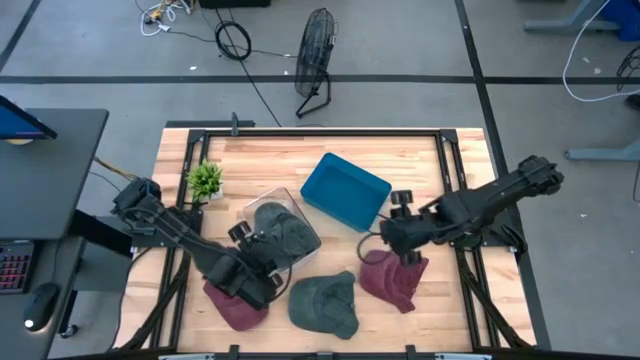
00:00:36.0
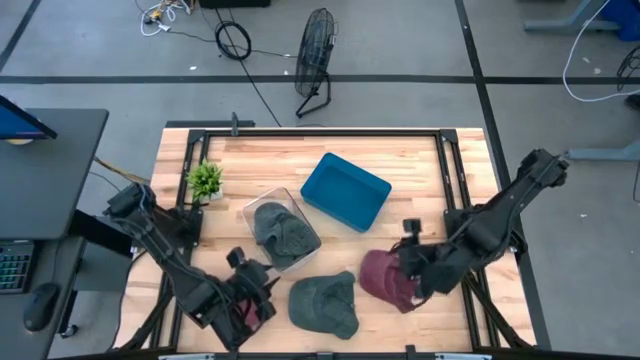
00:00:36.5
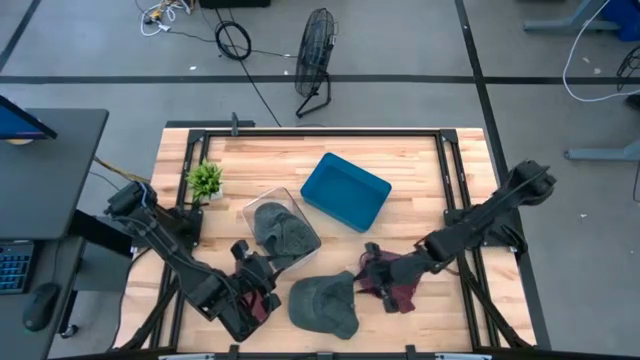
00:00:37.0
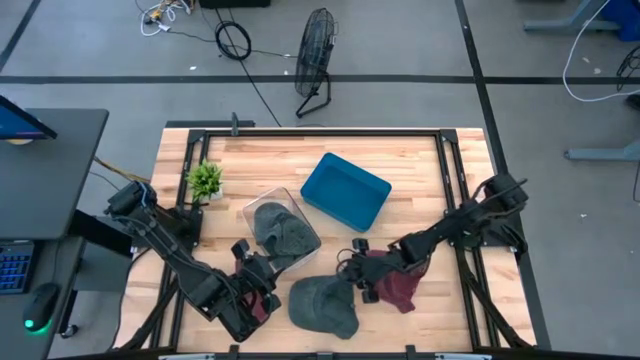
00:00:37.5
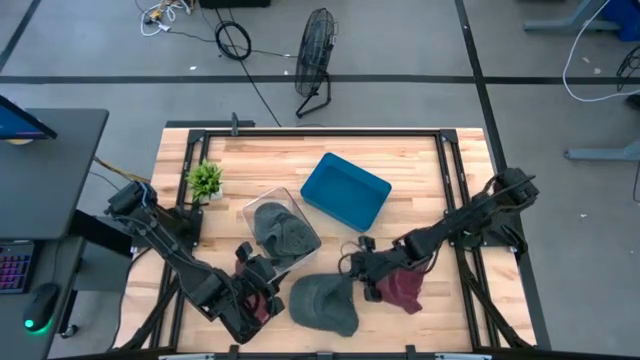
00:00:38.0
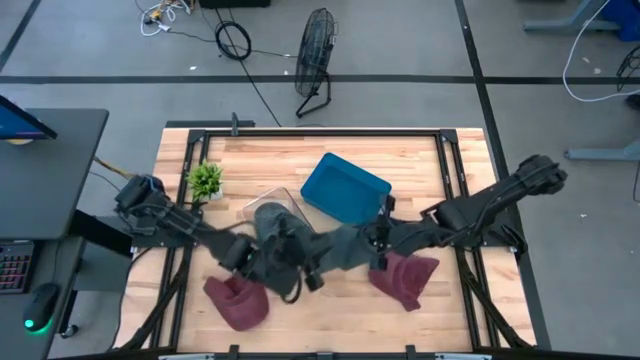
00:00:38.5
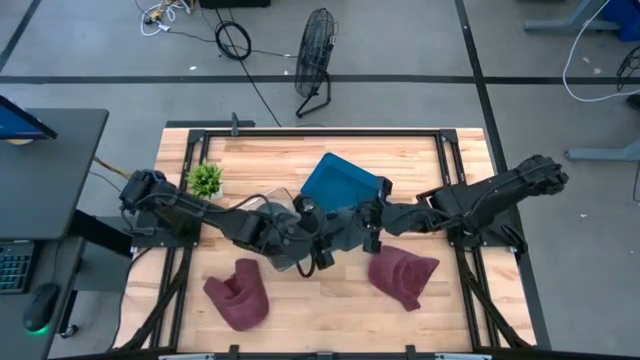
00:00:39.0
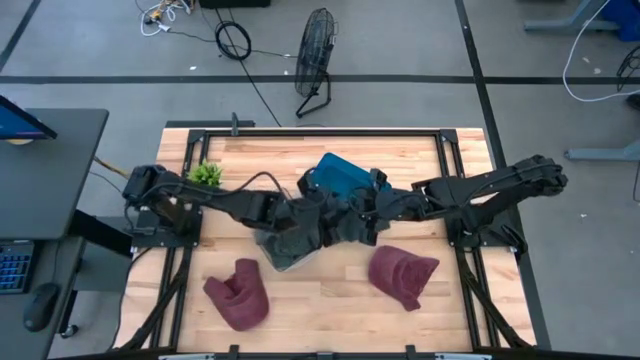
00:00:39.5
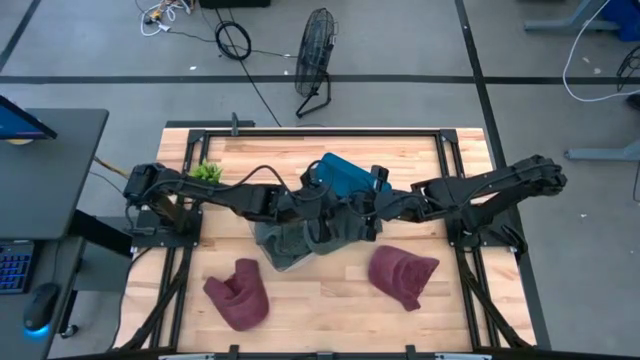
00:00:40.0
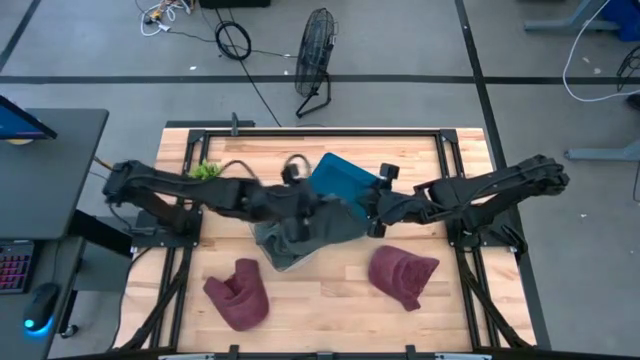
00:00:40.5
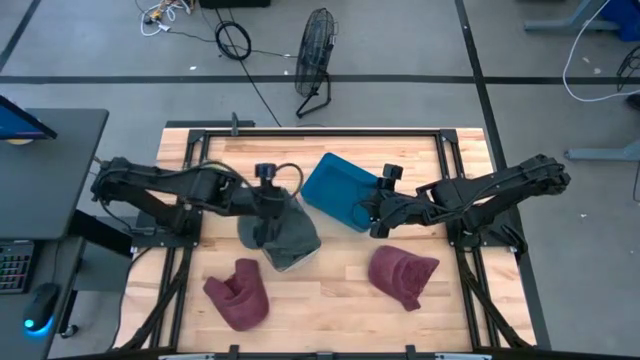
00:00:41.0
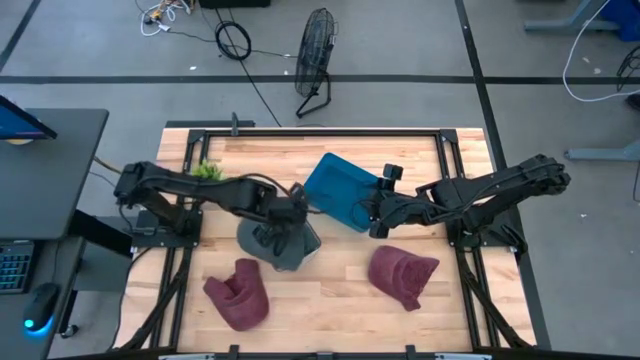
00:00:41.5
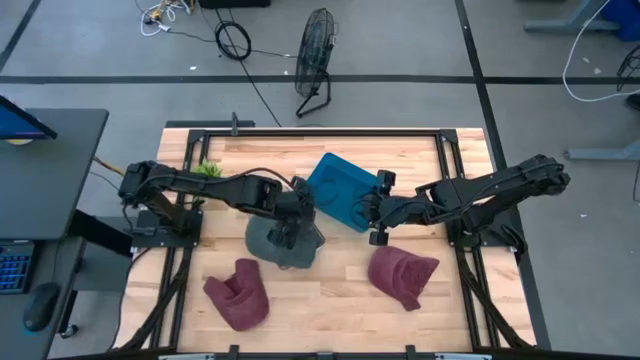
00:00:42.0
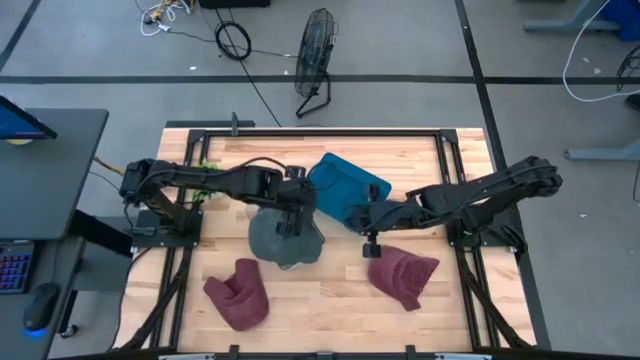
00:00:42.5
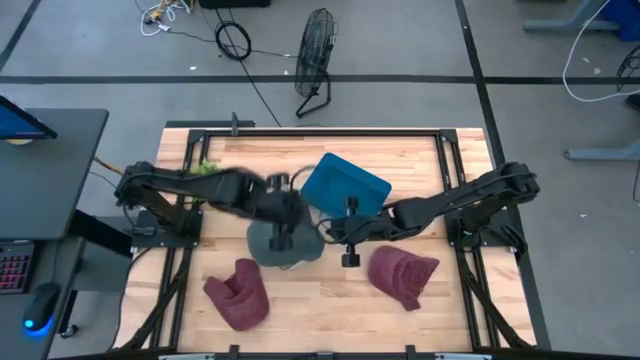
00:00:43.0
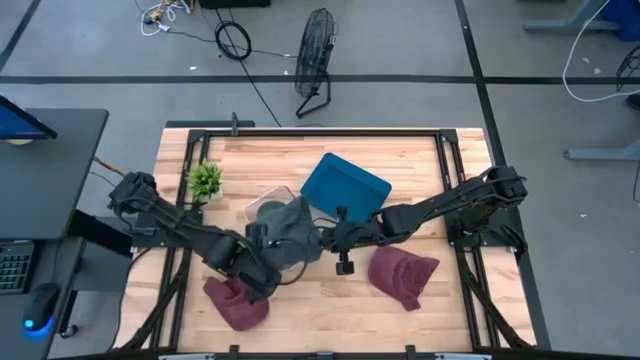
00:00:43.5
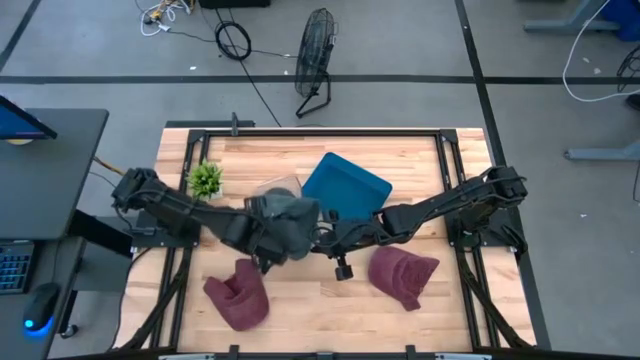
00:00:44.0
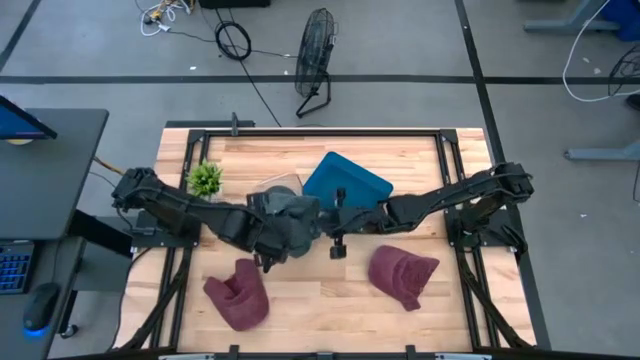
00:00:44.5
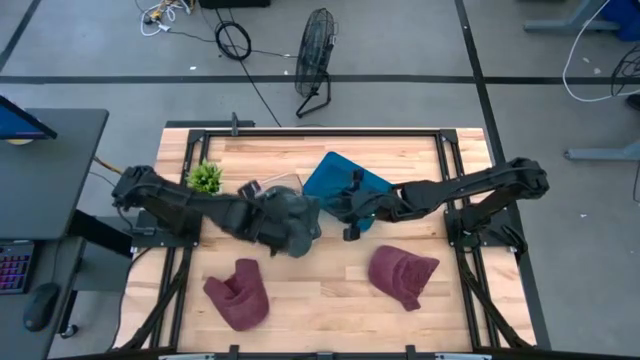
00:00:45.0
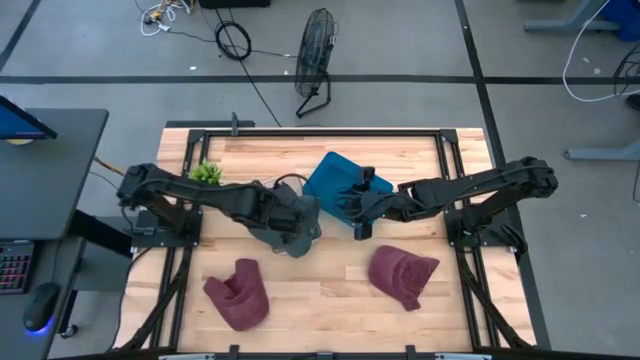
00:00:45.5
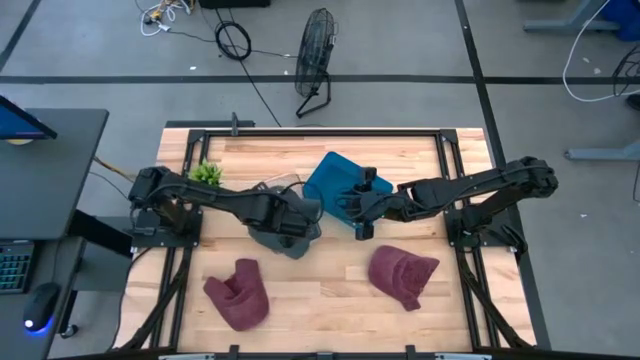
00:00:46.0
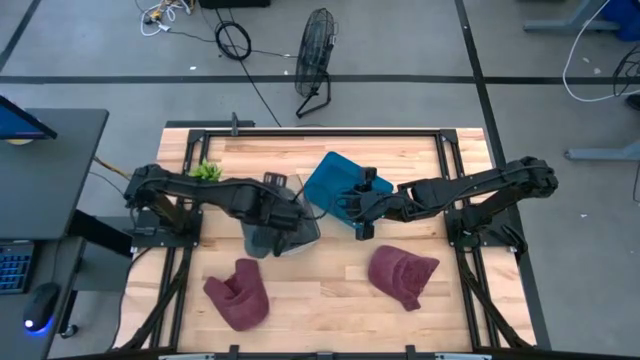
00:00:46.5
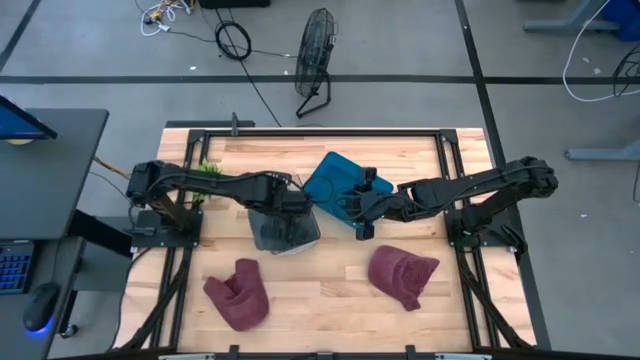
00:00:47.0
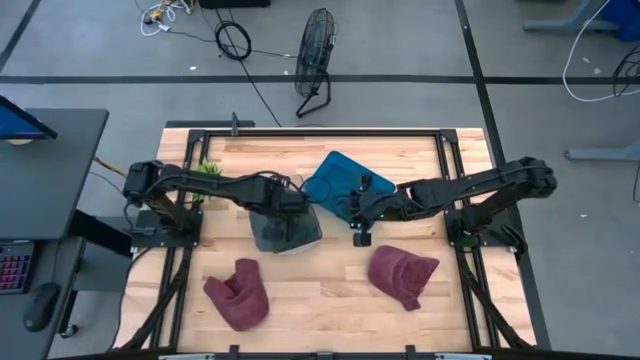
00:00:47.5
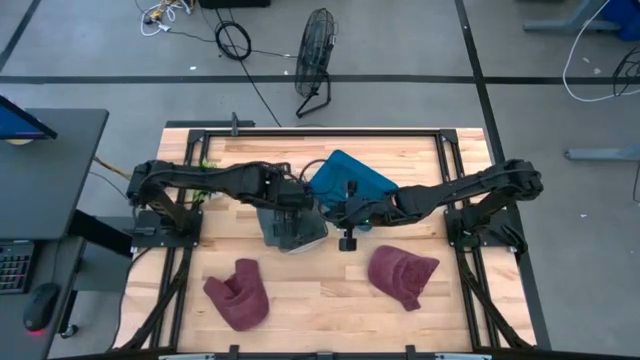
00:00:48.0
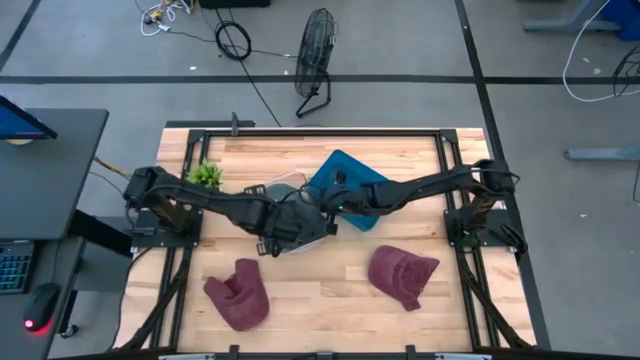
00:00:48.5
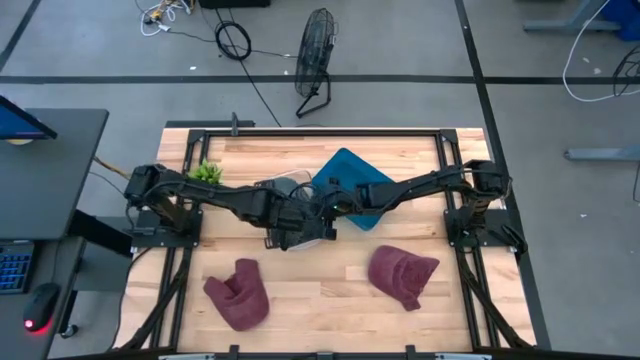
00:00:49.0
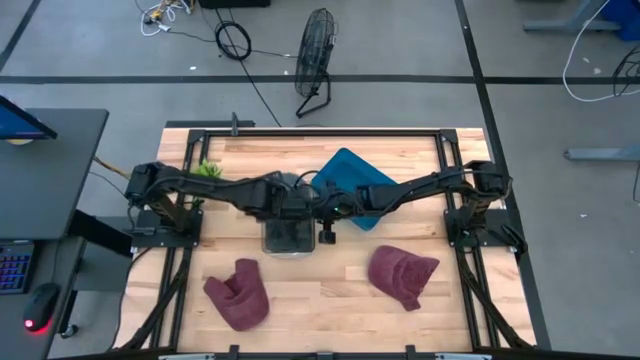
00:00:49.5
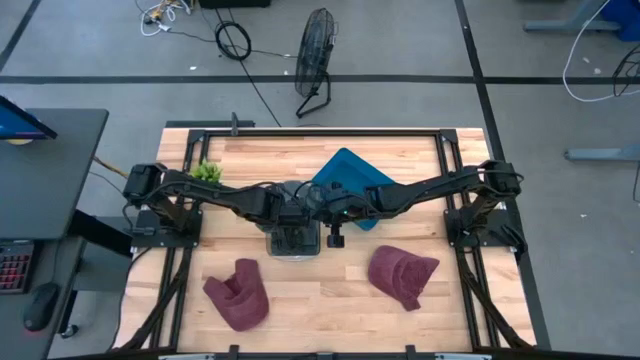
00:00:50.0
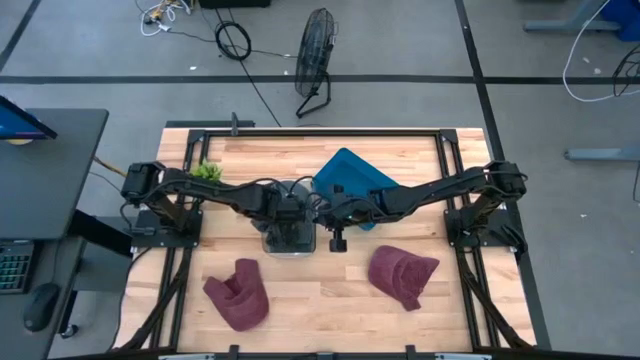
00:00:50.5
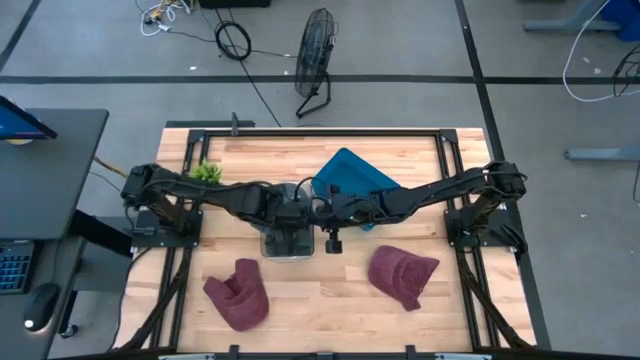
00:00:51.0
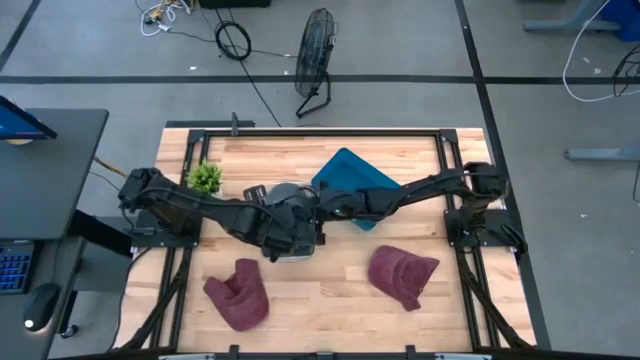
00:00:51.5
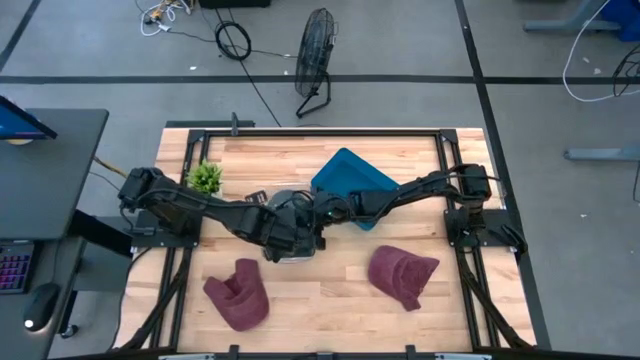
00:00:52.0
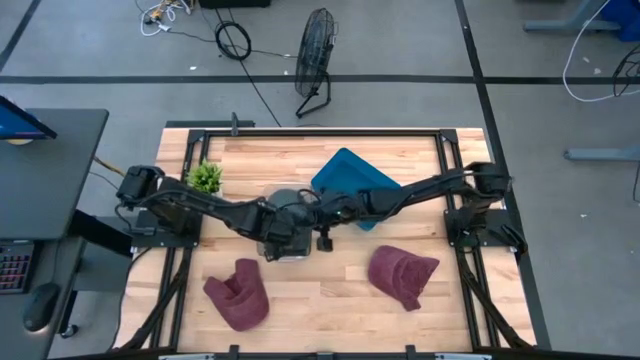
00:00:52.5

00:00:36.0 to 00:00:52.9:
Task: Pick & Place hat
Put the gray cap into the transparent bin

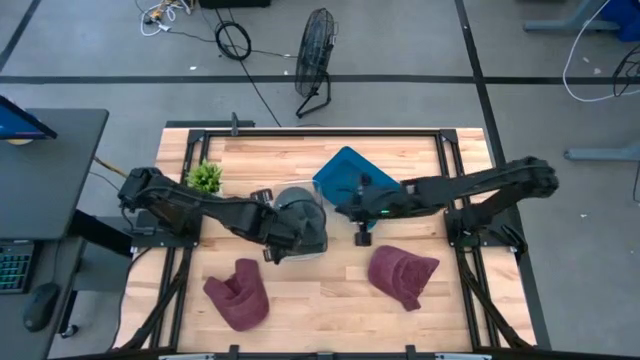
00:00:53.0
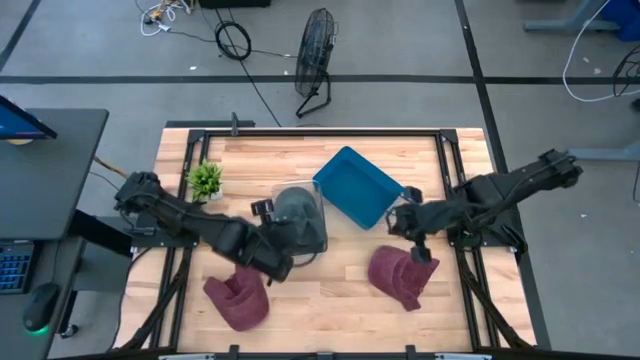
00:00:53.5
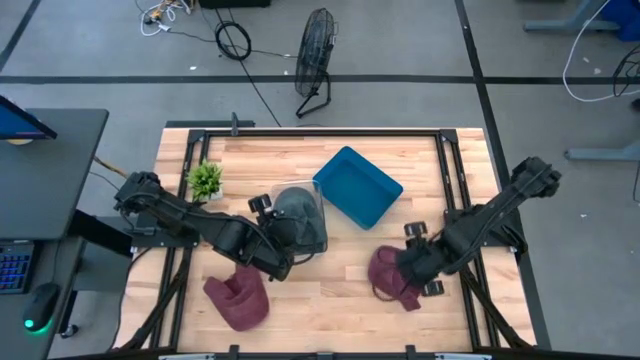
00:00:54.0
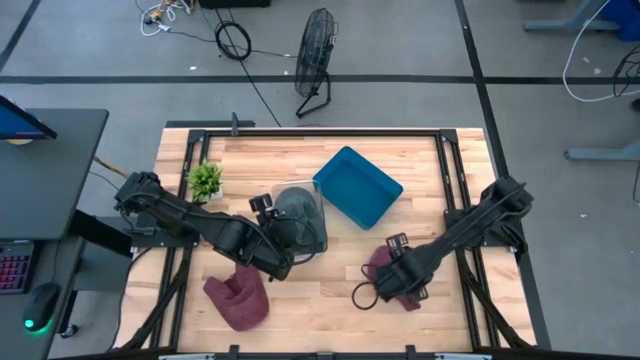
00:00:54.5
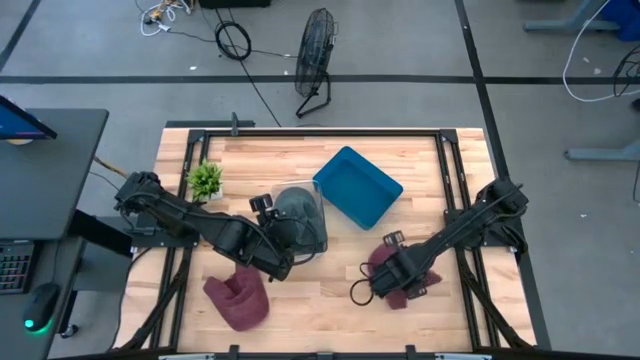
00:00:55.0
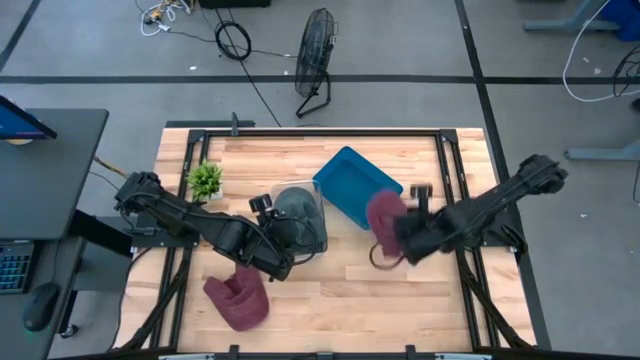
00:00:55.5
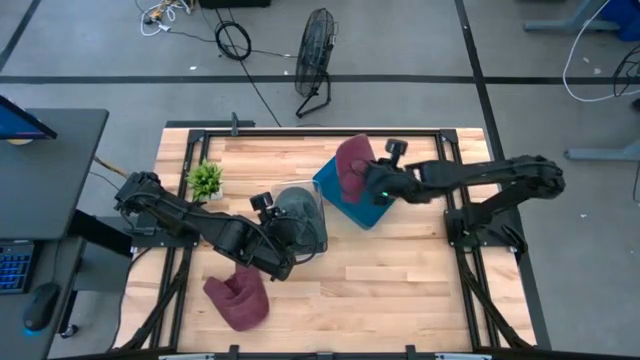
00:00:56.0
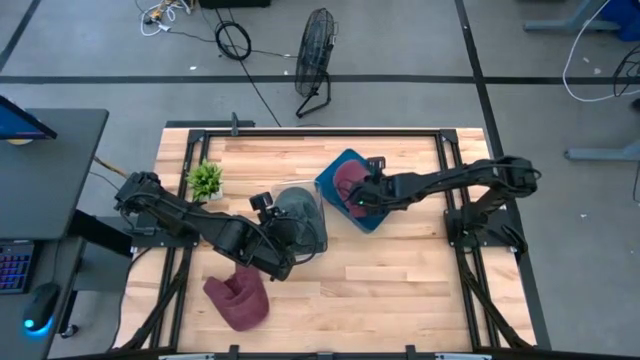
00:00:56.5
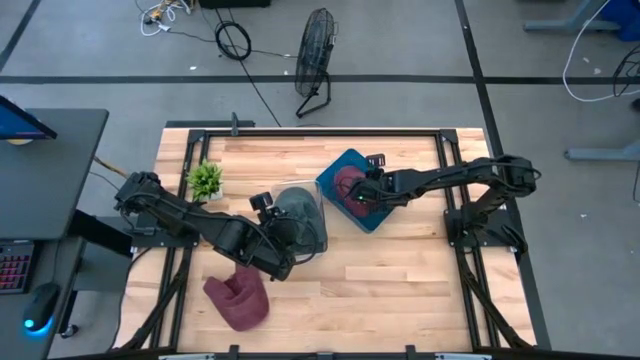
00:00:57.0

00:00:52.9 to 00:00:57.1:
Put the right red cap into the blue bin
